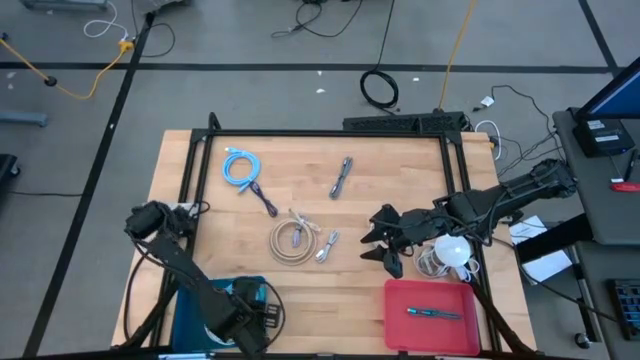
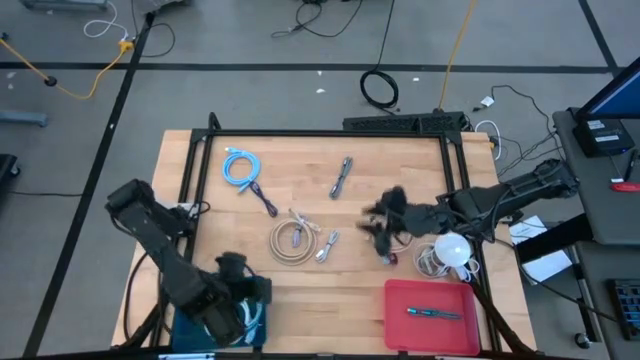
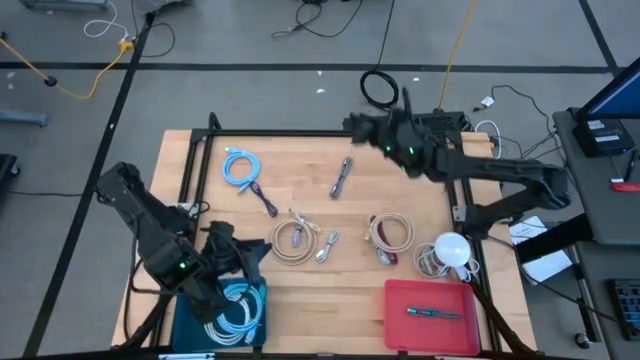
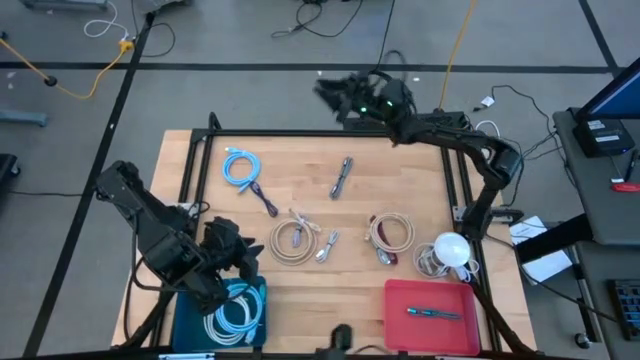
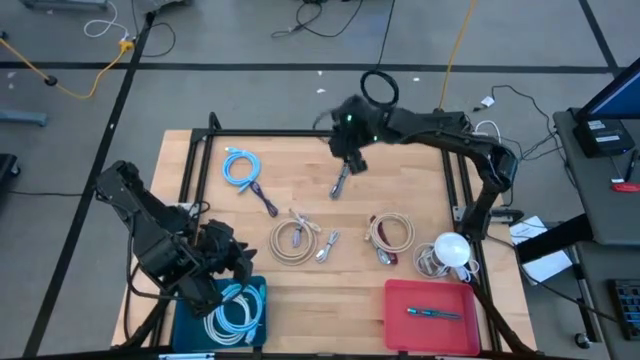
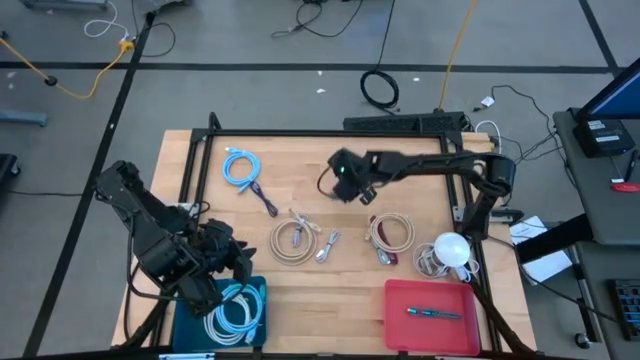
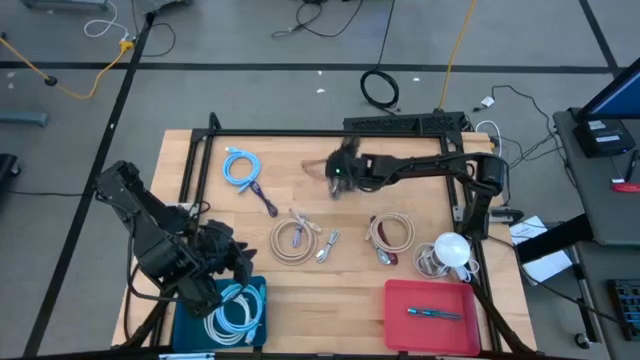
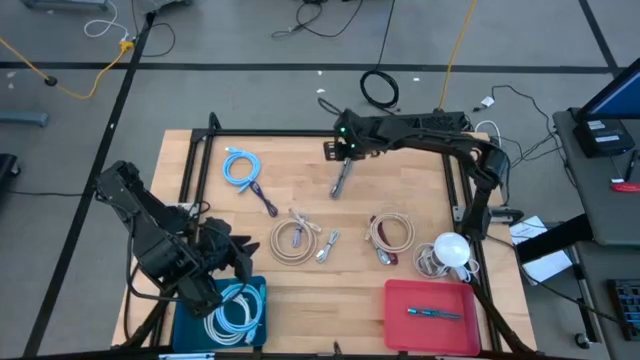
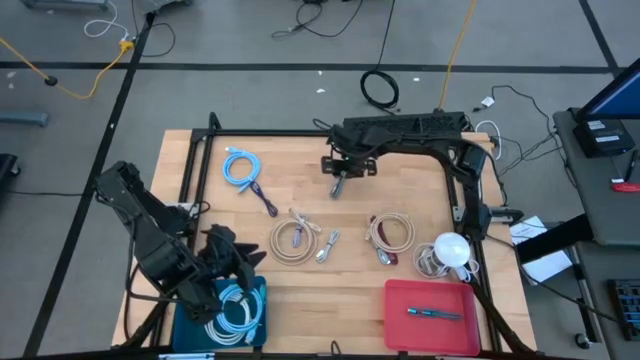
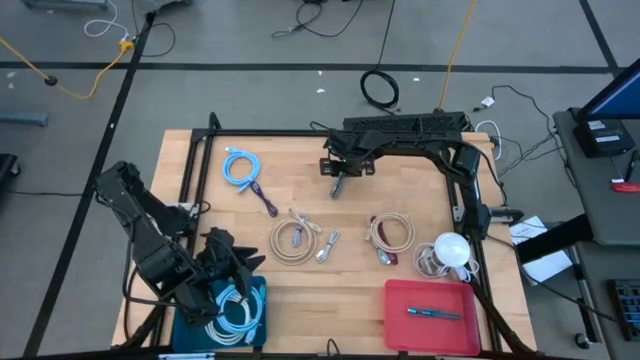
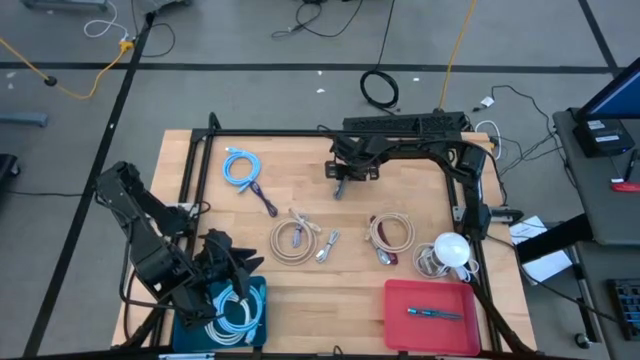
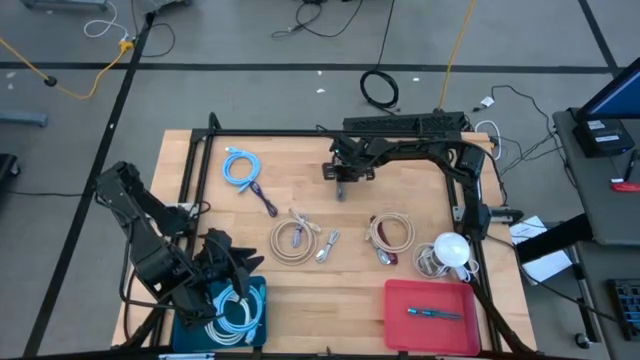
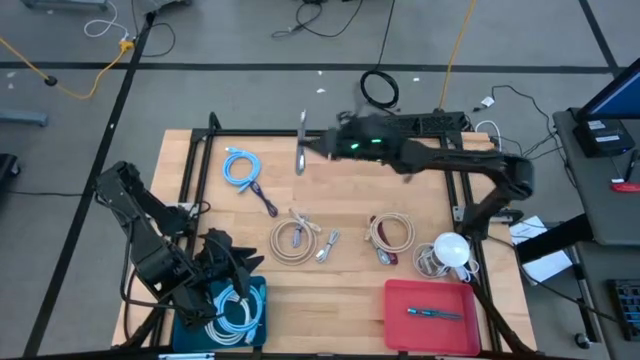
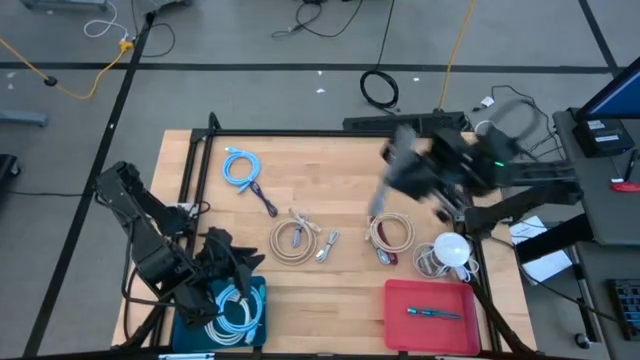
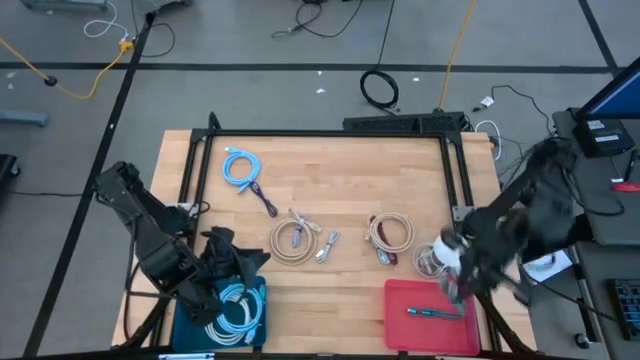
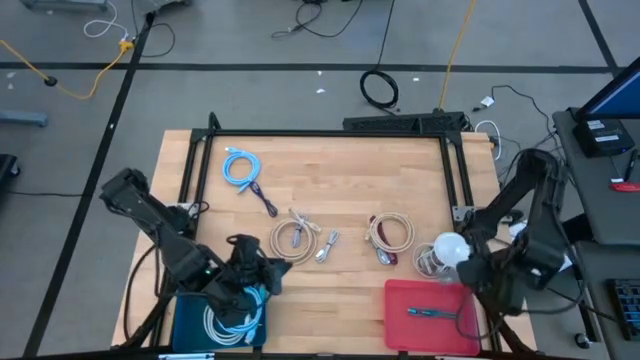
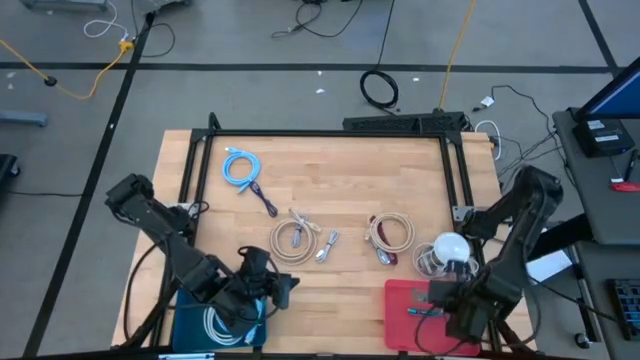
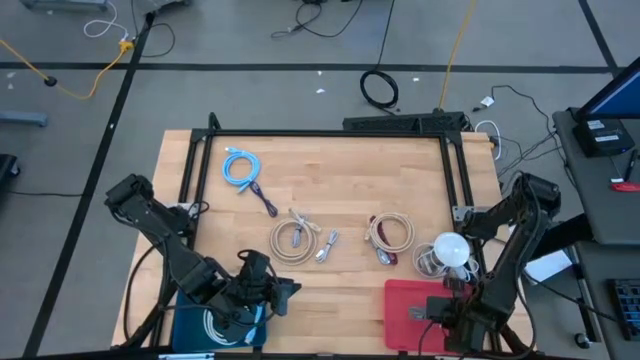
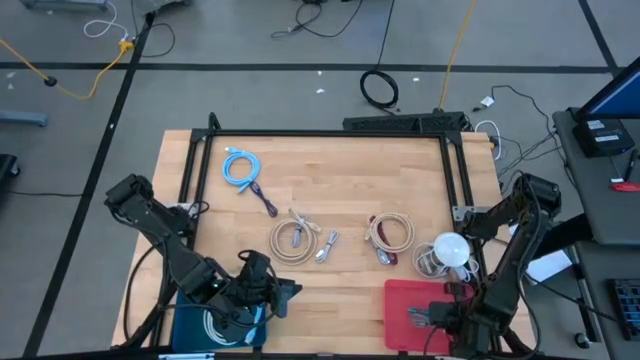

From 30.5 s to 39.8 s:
Task: Pick & Place USB Port
Put the white and black charger cable into the pink bin

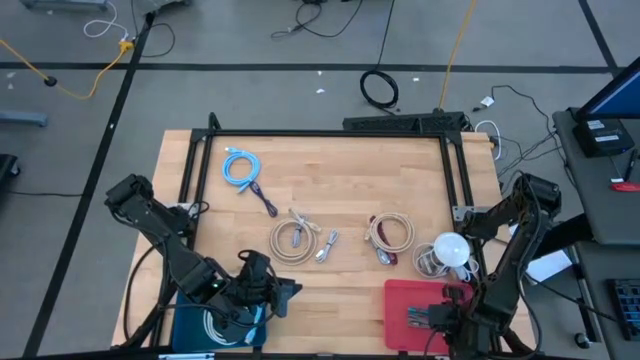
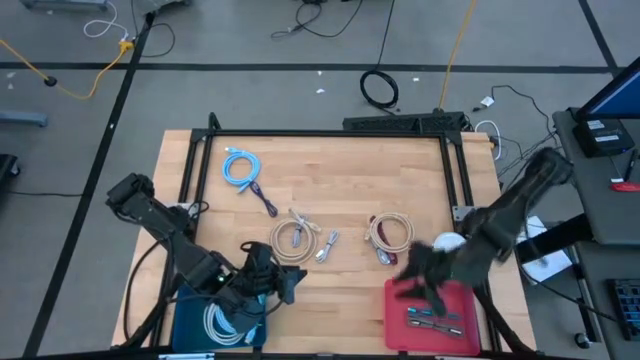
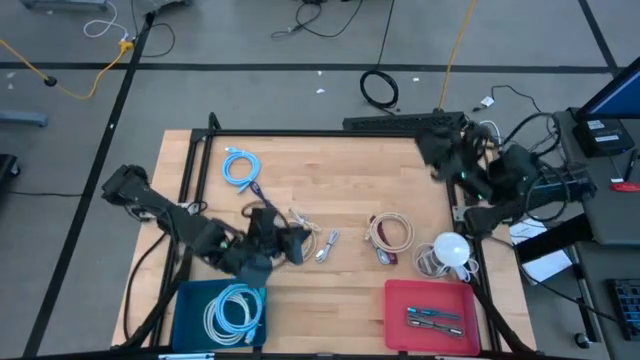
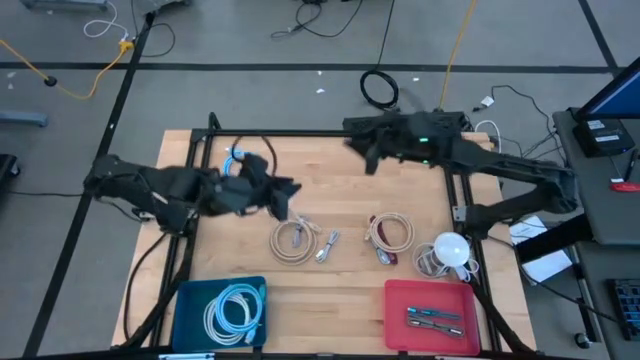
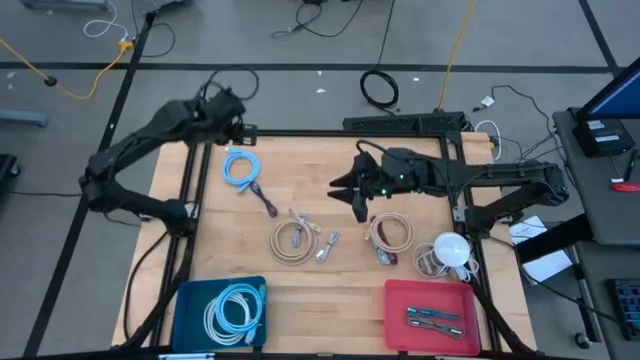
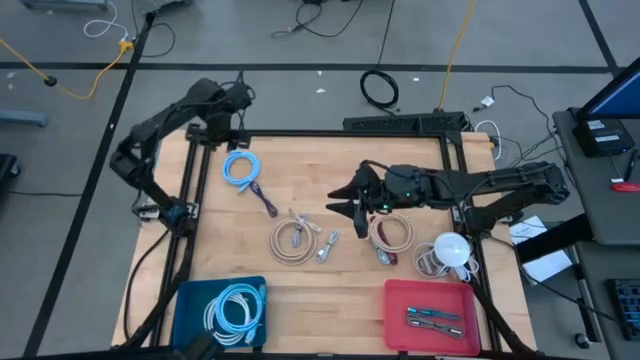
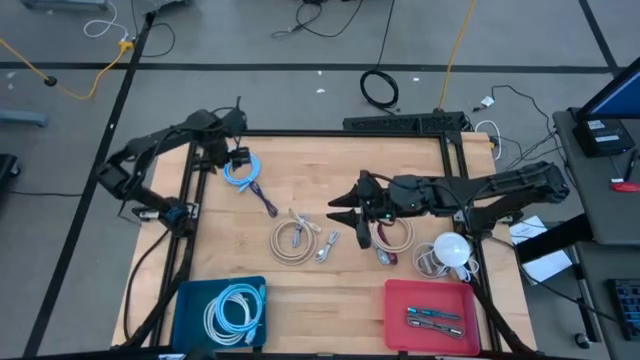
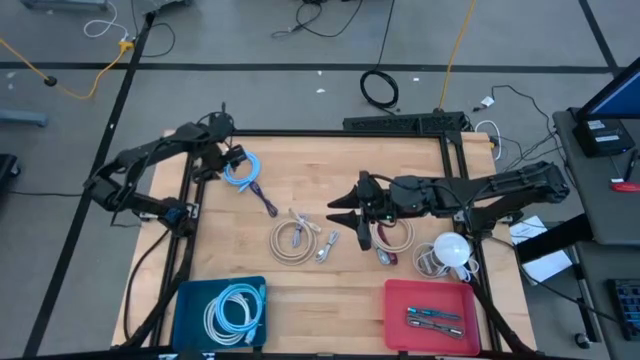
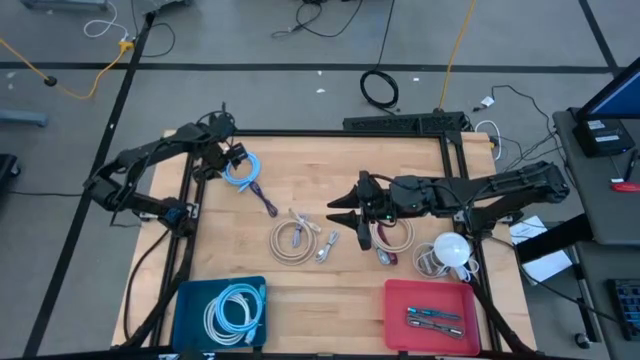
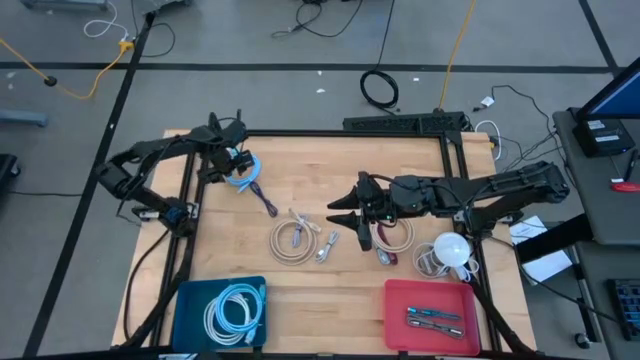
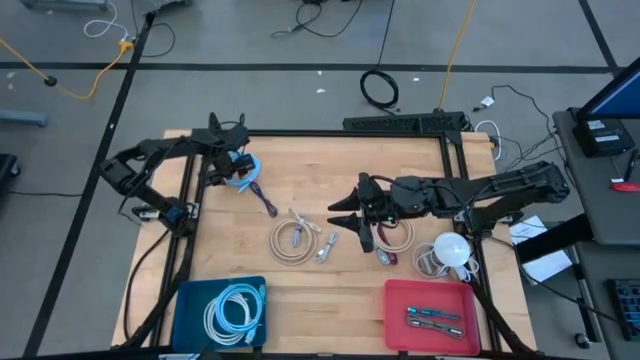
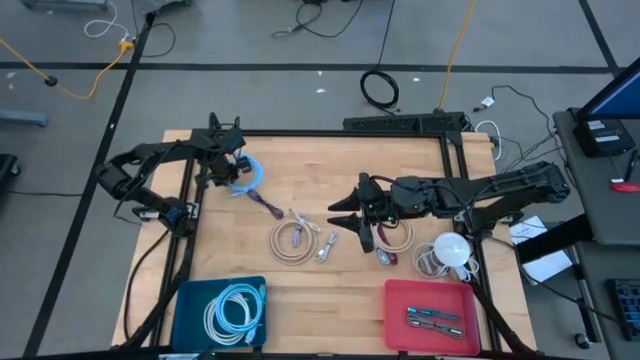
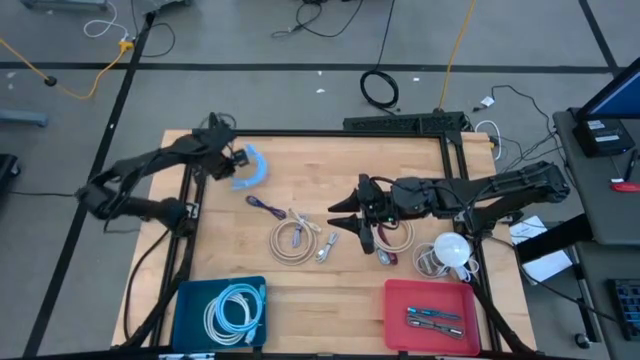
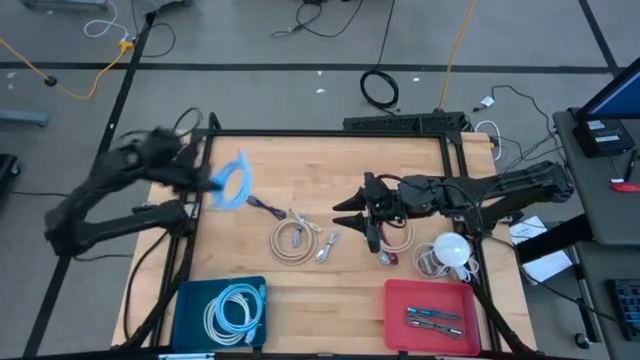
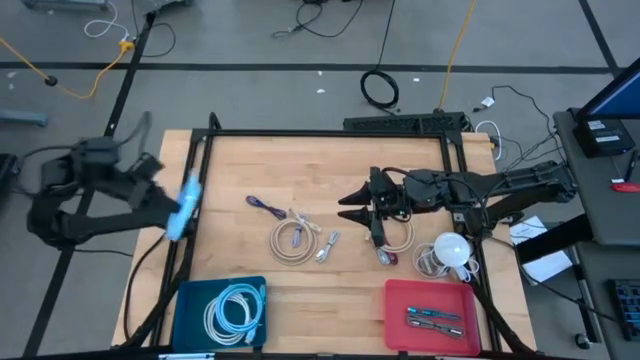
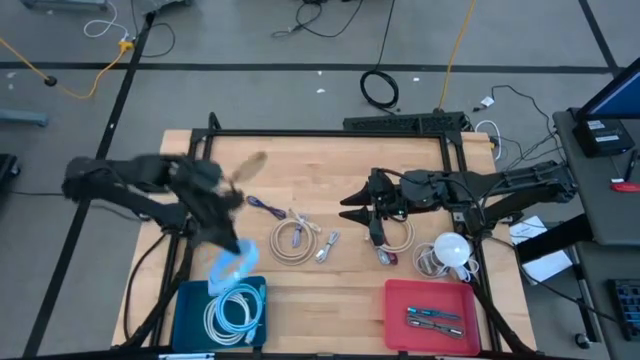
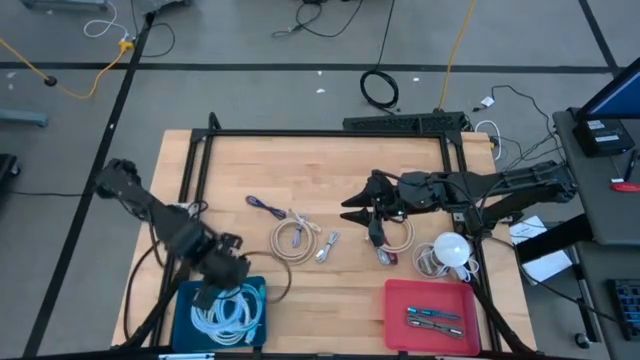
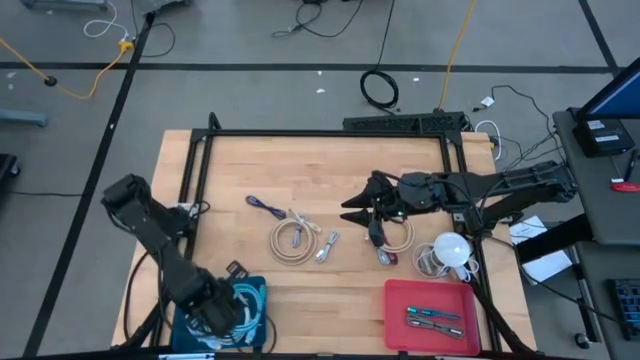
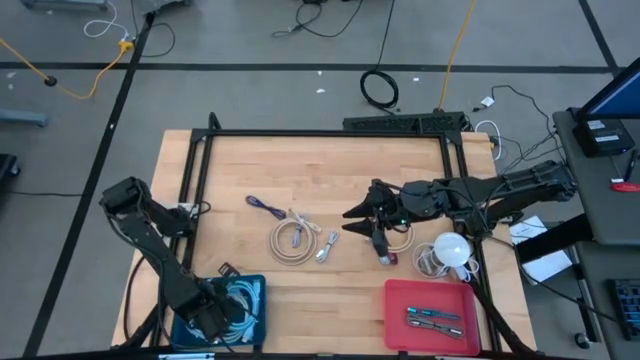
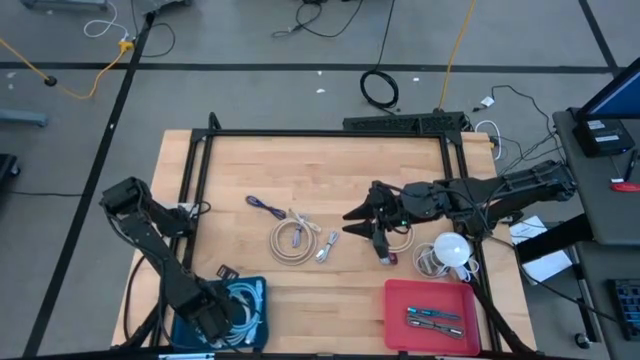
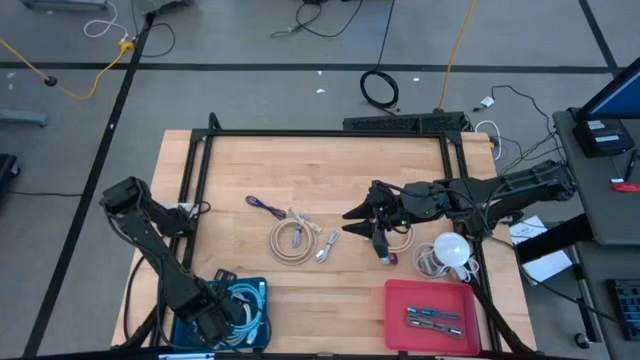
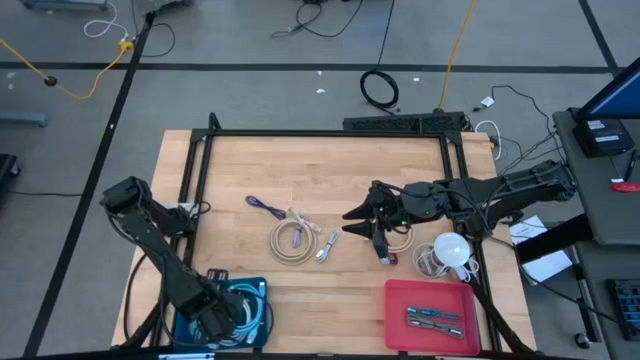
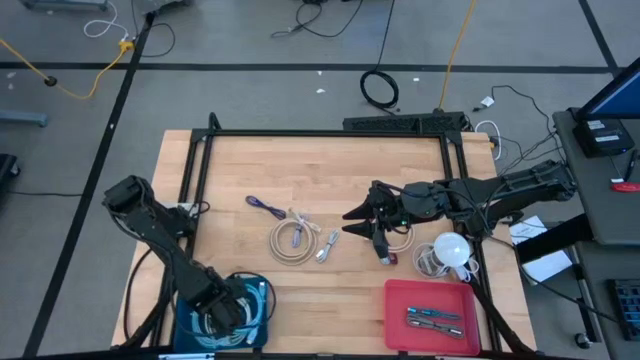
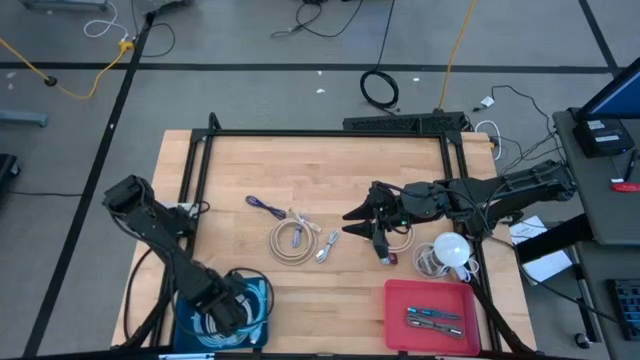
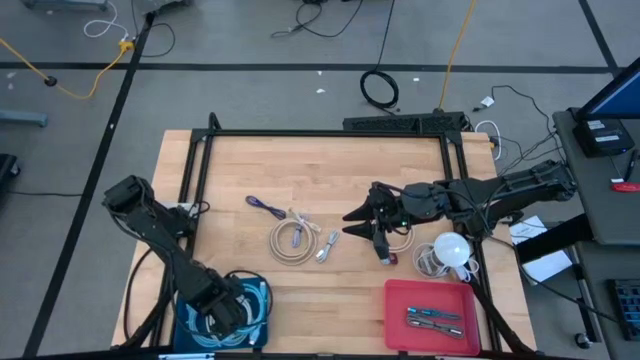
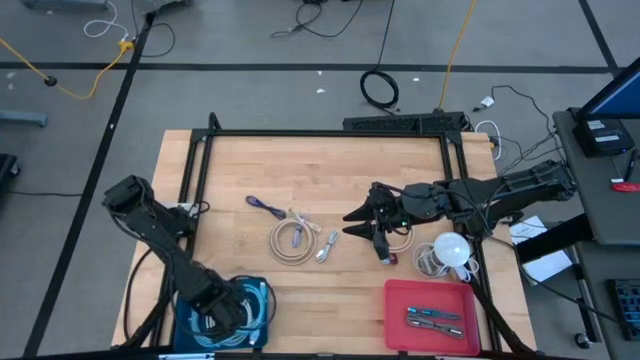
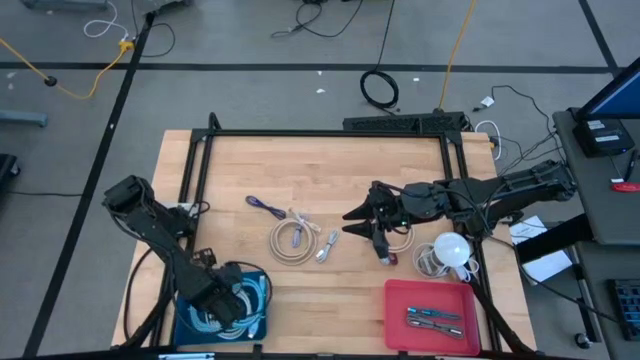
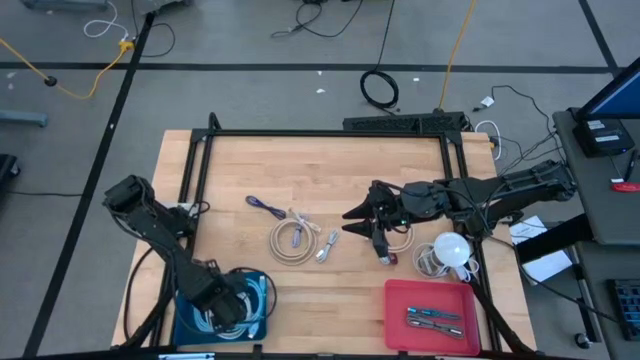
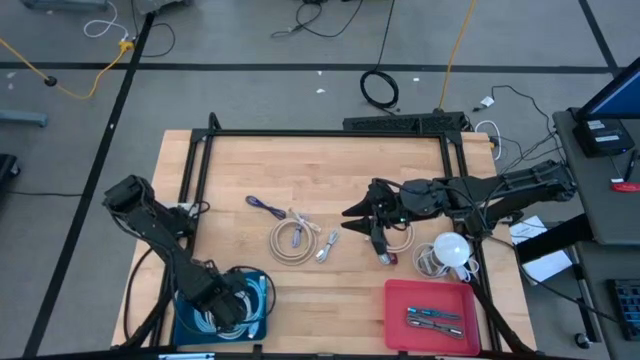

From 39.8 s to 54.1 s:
Put the blue HDMI cable into the blue bin
